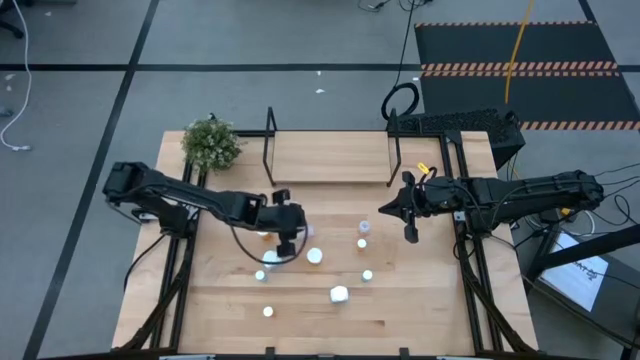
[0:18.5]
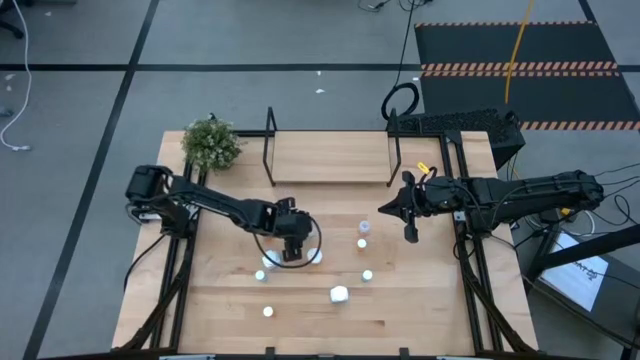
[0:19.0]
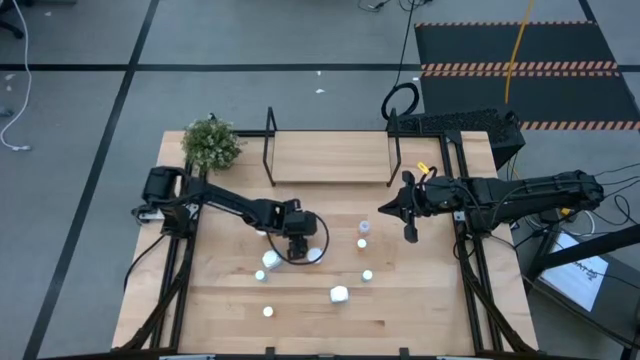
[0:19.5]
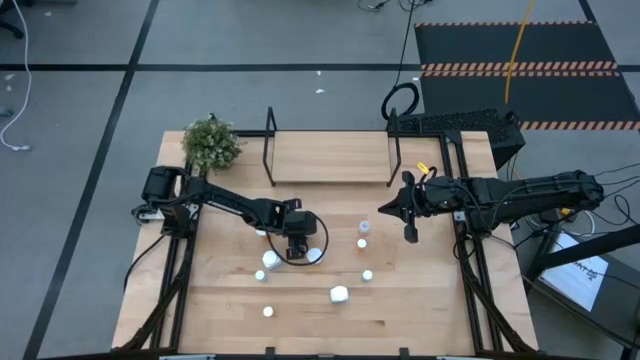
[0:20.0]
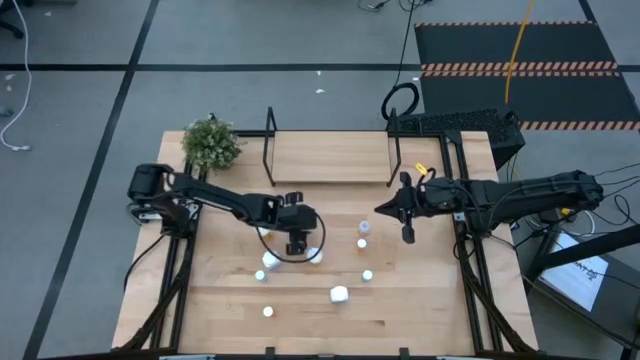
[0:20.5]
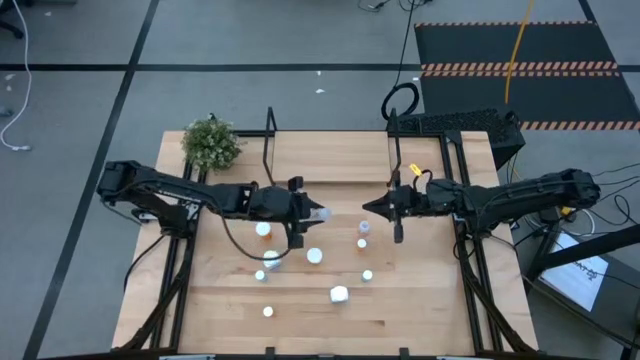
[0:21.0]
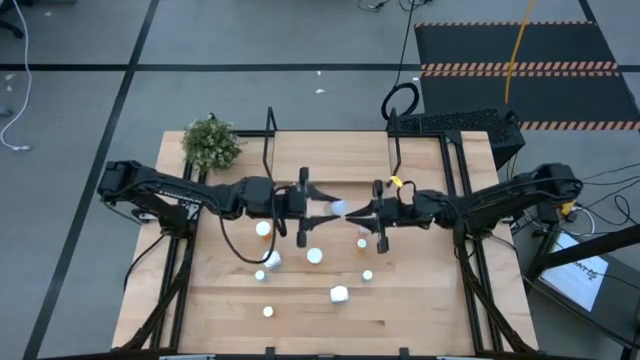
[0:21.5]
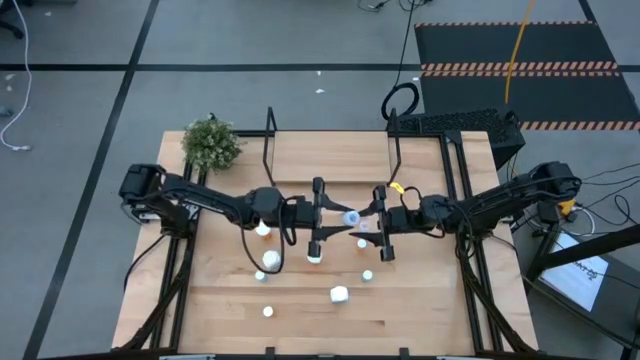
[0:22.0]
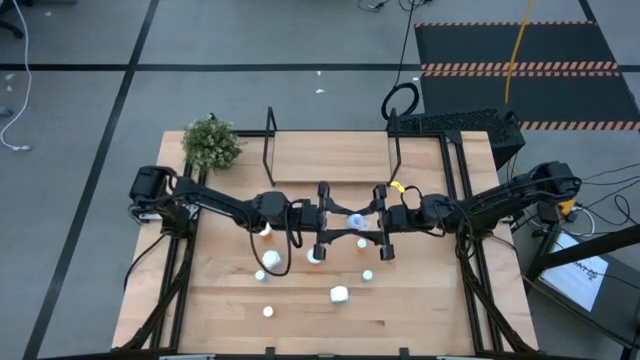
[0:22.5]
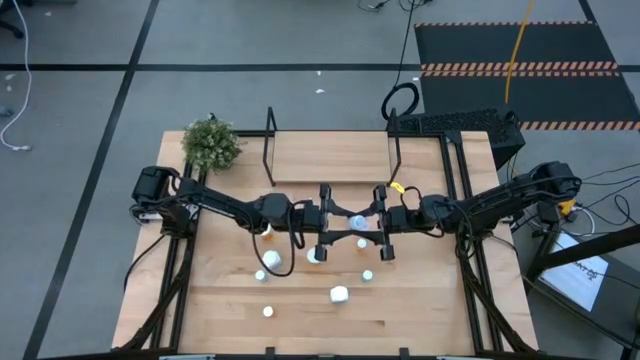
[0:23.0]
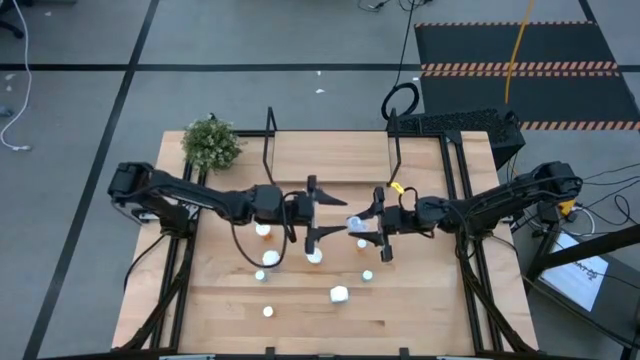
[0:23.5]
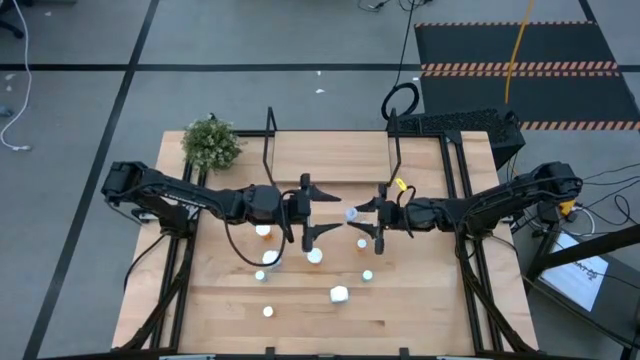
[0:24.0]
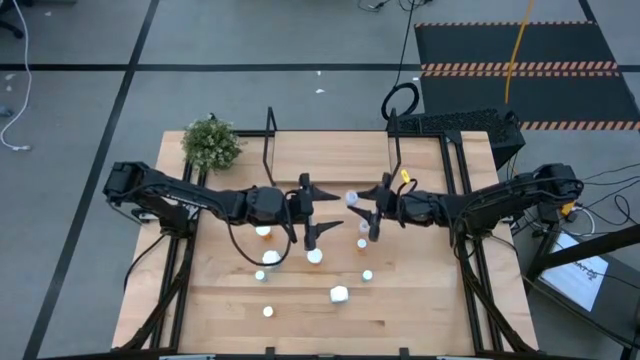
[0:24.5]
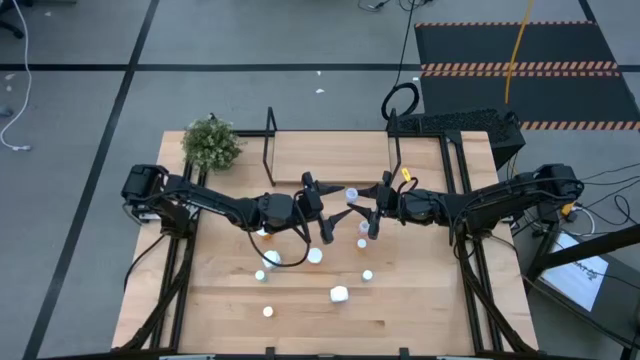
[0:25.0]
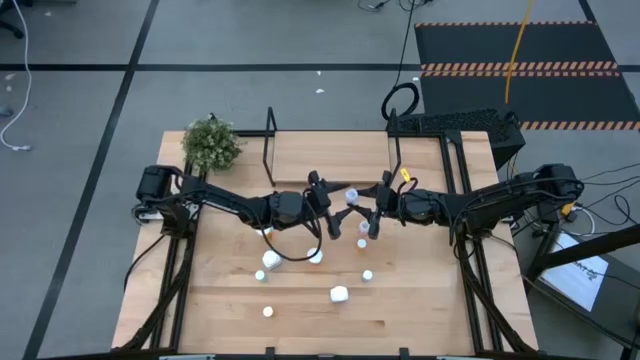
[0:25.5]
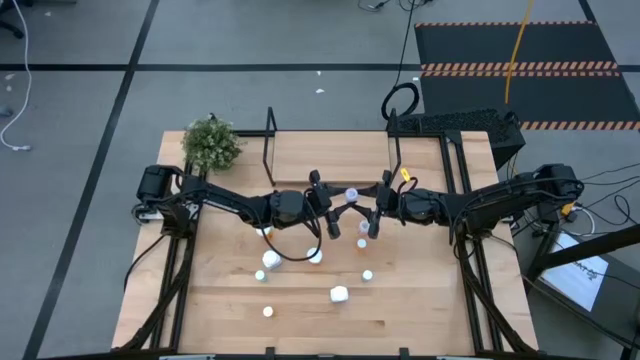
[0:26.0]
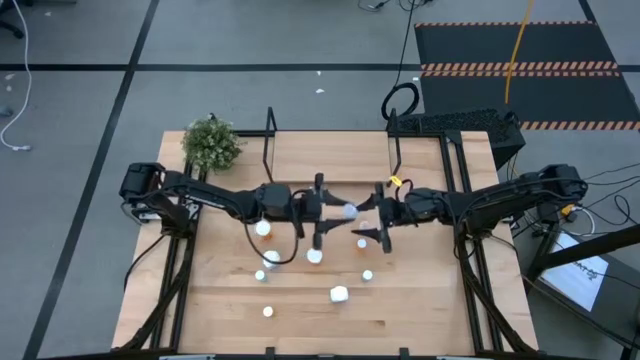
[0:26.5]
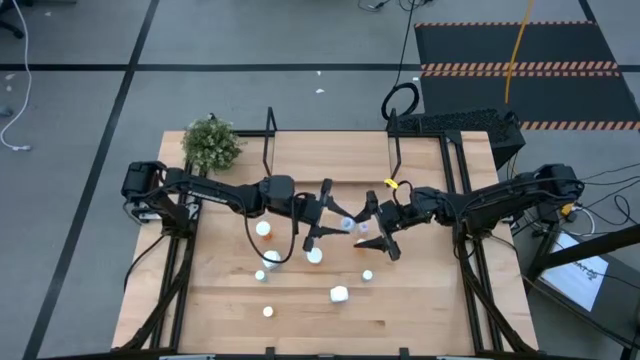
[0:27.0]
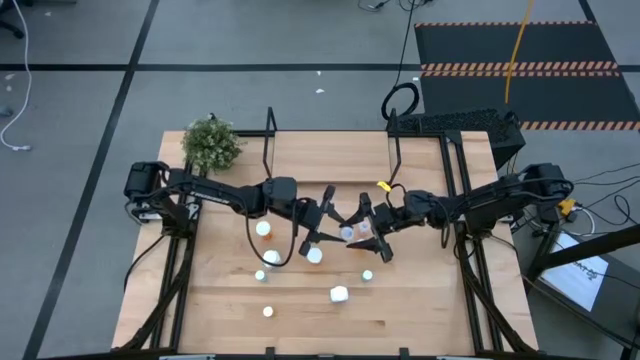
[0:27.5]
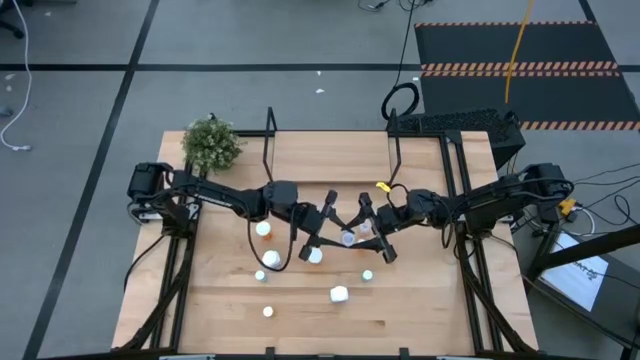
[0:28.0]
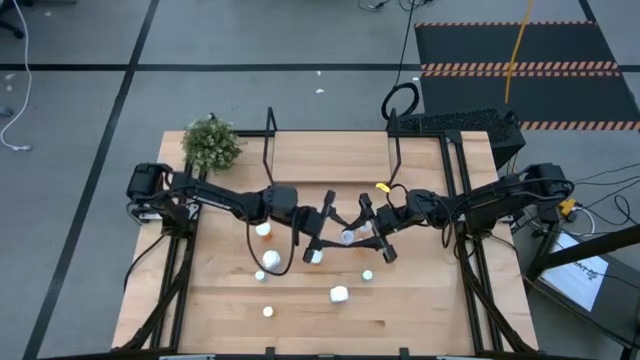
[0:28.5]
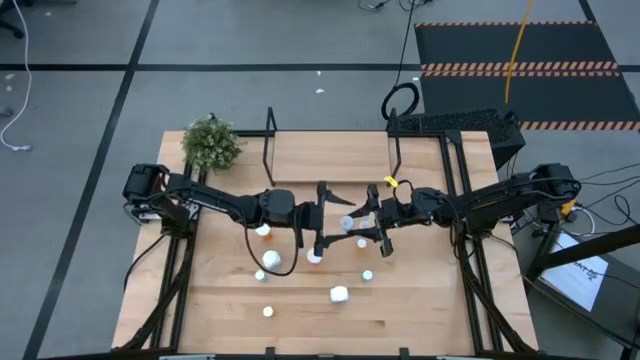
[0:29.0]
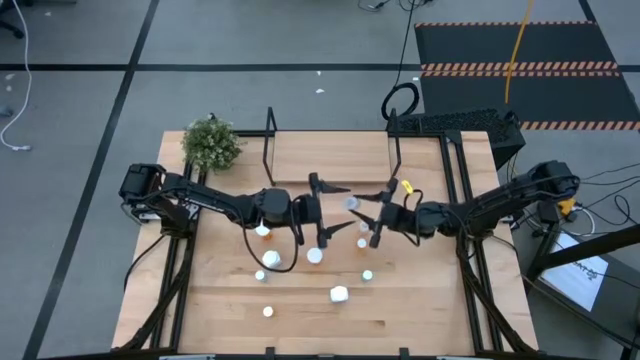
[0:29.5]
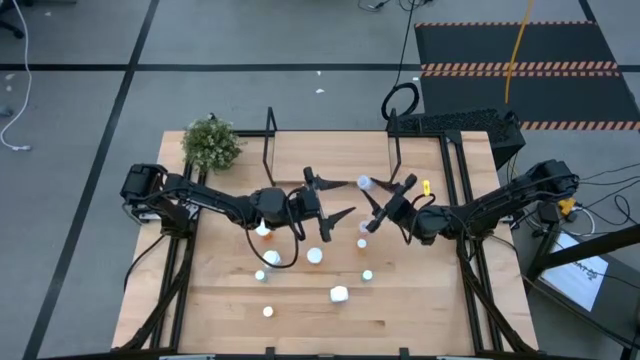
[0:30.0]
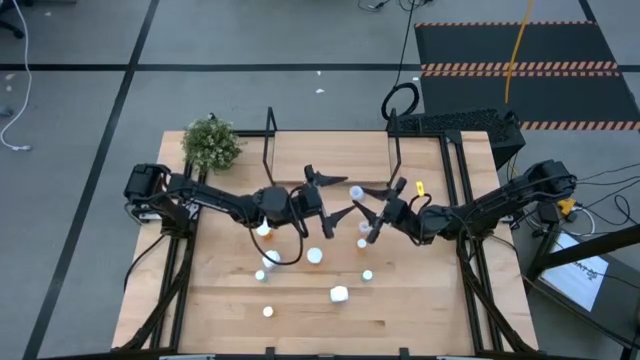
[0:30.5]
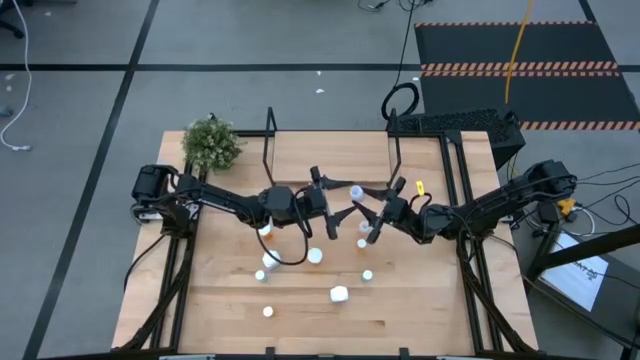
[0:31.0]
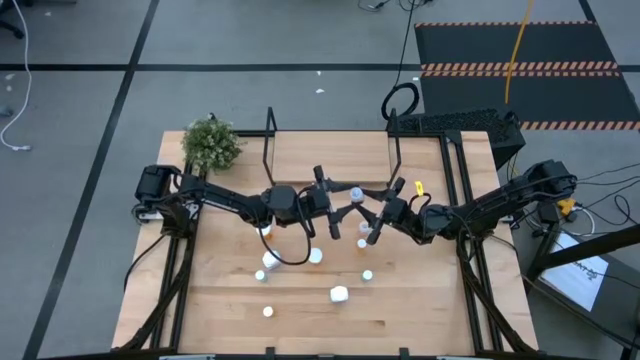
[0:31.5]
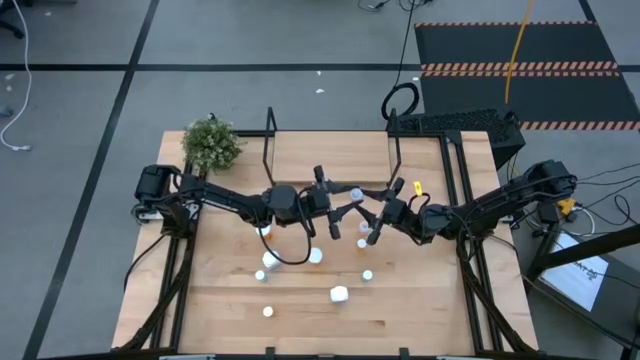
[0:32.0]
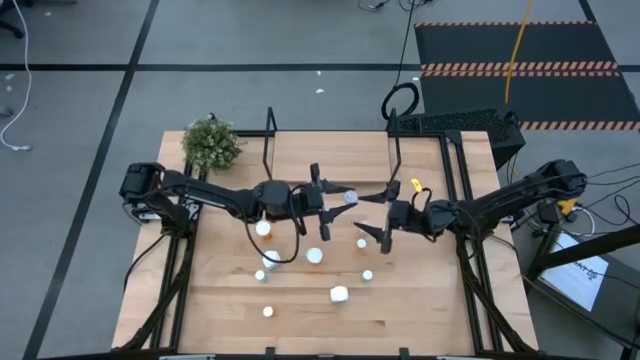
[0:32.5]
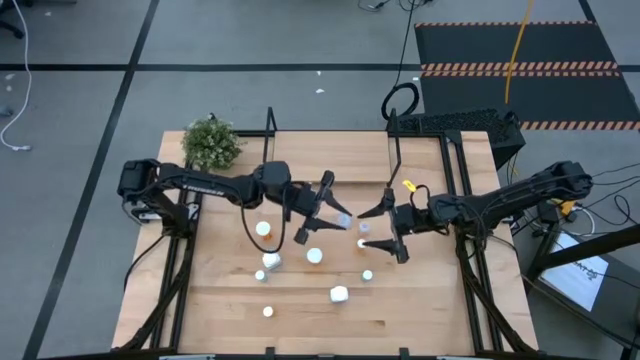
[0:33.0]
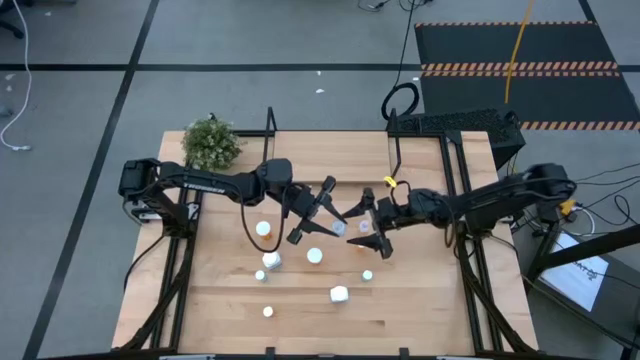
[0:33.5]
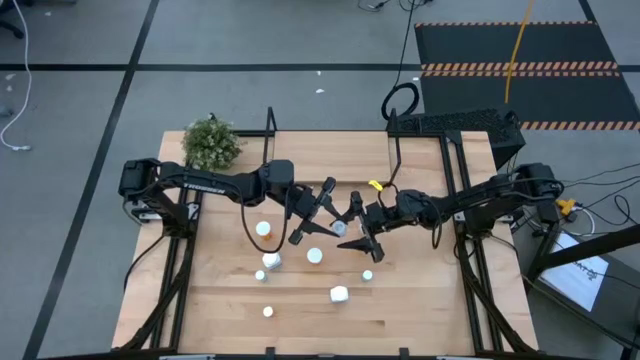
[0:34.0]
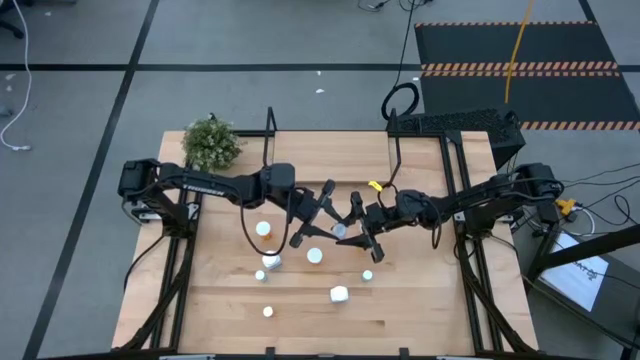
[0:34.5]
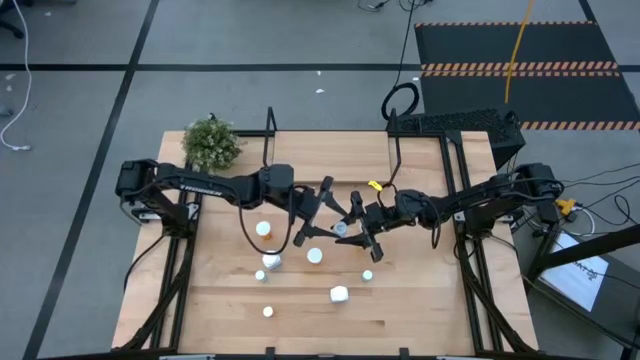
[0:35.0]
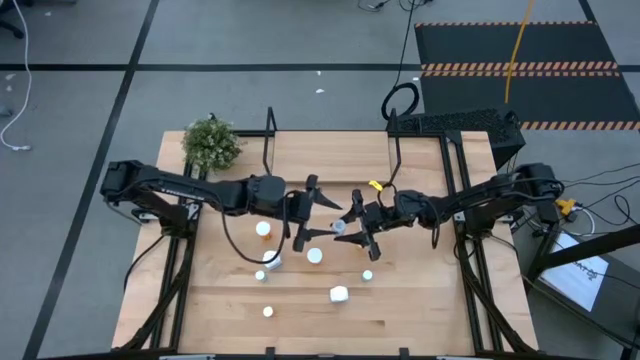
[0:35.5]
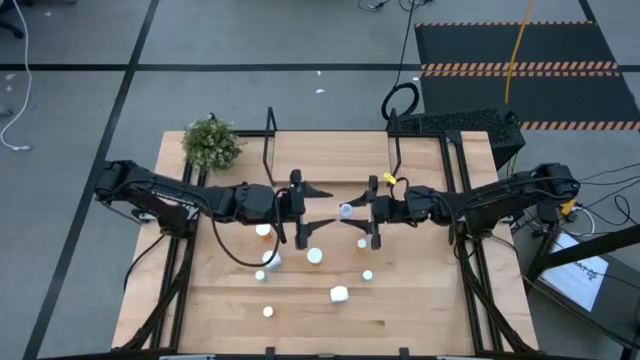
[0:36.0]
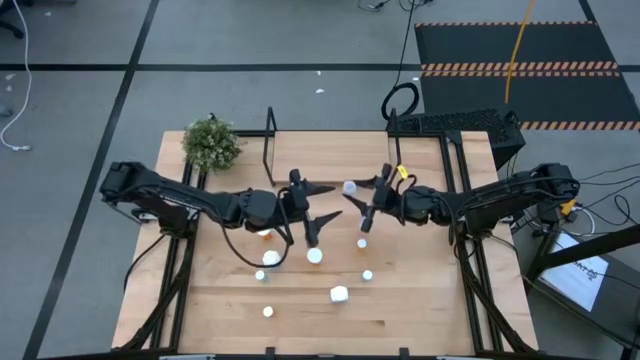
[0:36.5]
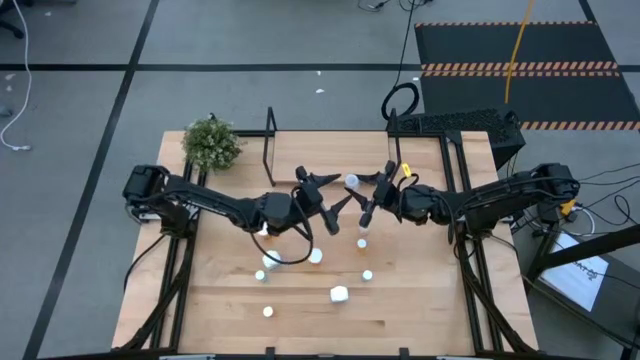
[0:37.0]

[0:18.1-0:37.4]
Task: Pick and place medicine bottles onto shelf by color
Put the left transparent pill bottle on the shelf
